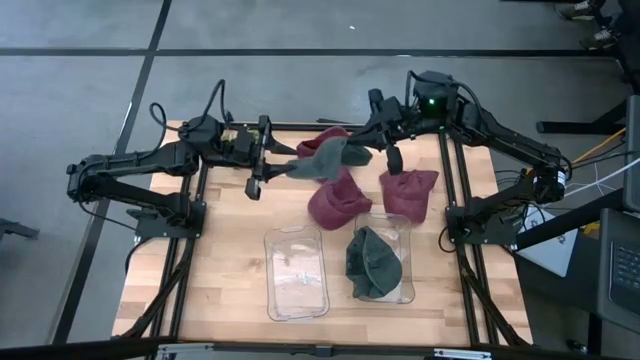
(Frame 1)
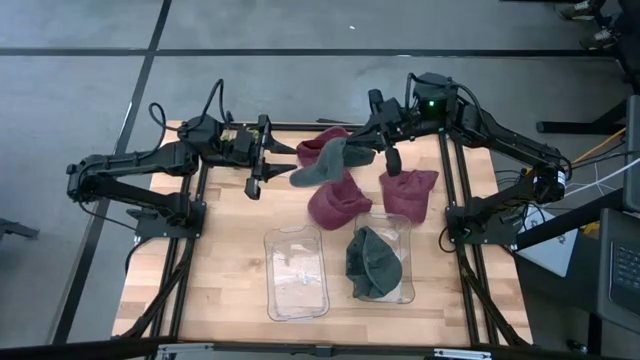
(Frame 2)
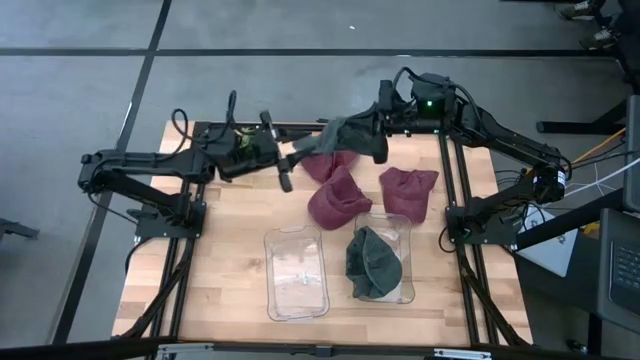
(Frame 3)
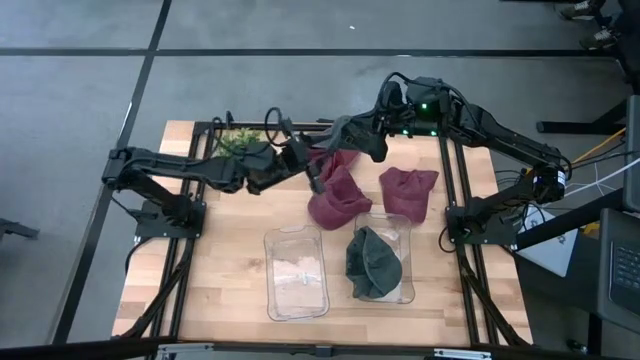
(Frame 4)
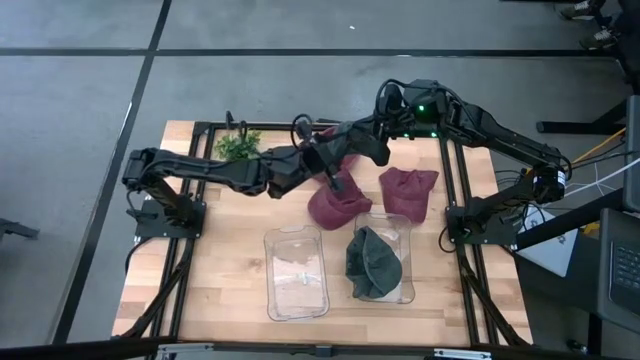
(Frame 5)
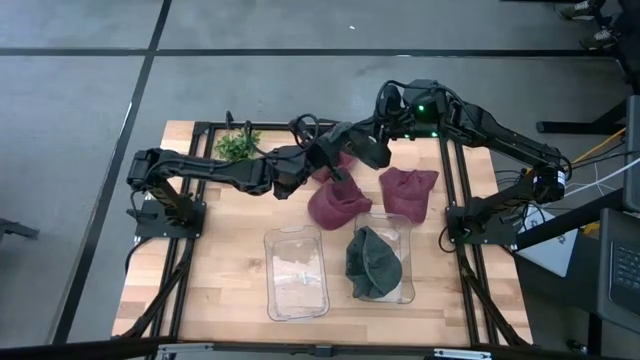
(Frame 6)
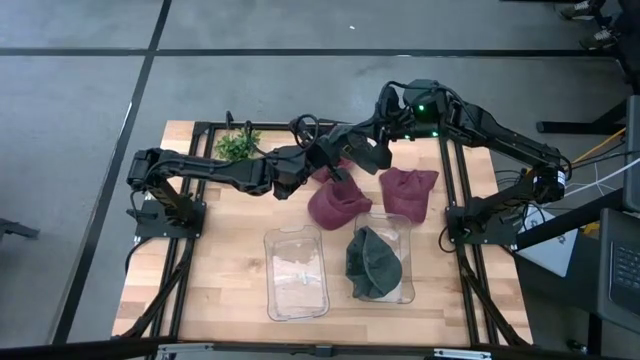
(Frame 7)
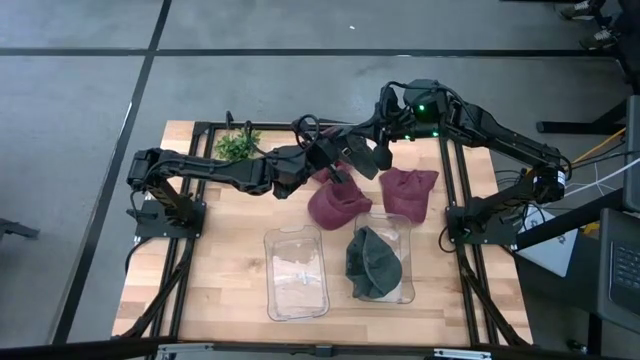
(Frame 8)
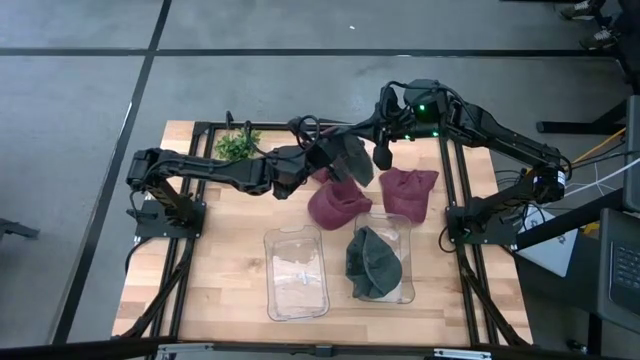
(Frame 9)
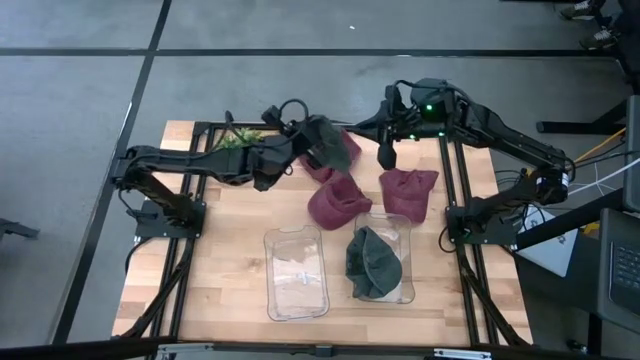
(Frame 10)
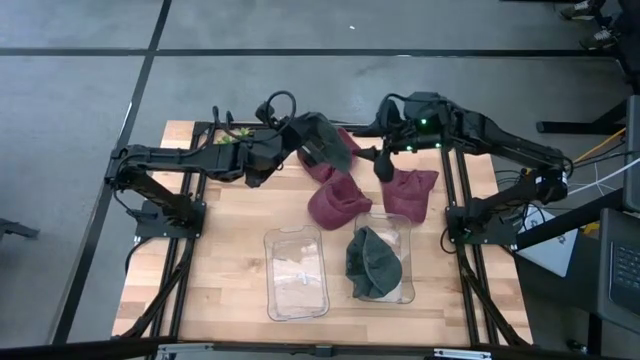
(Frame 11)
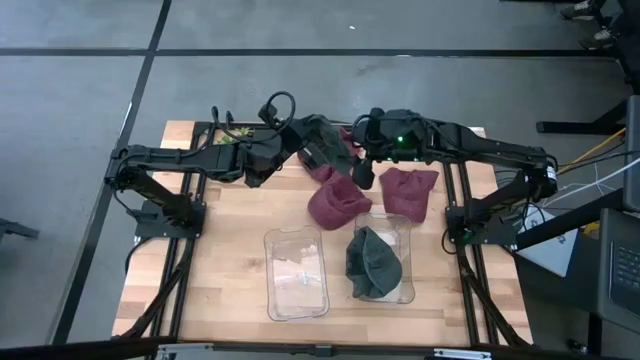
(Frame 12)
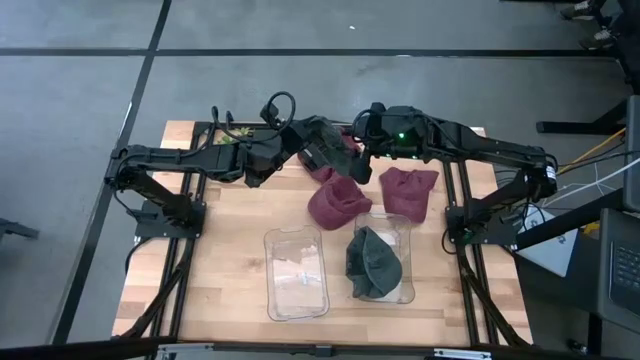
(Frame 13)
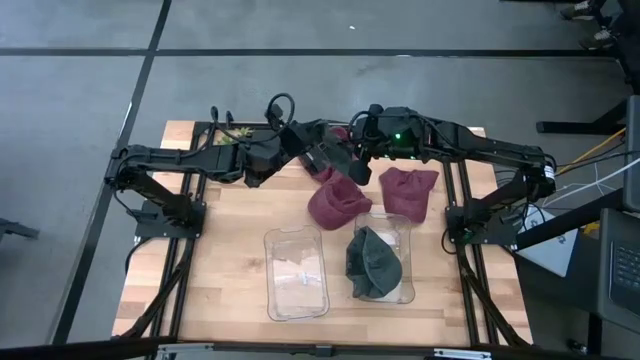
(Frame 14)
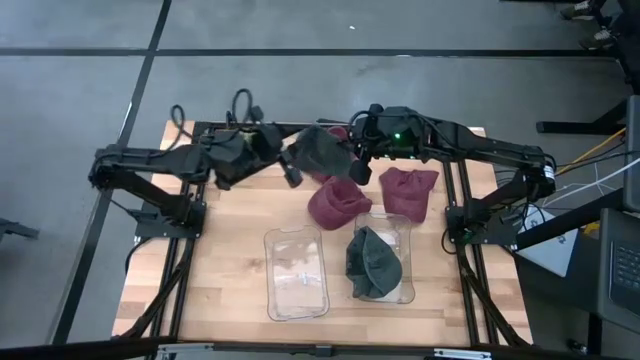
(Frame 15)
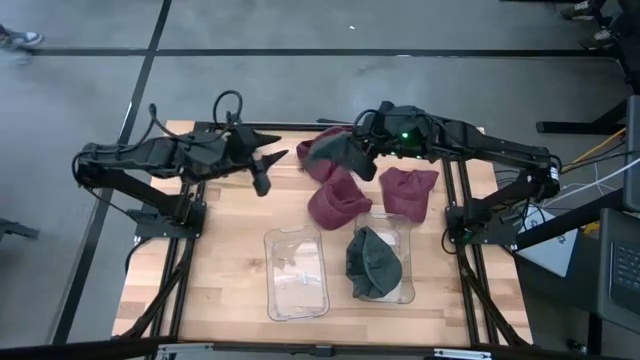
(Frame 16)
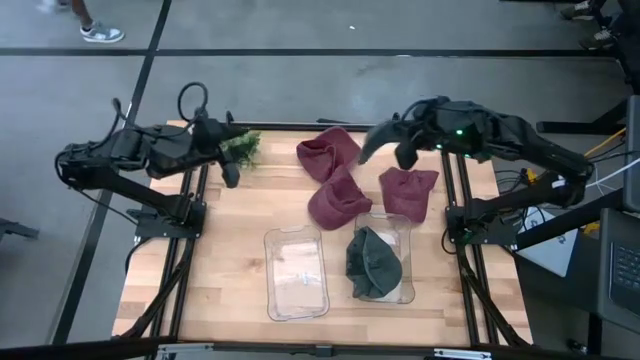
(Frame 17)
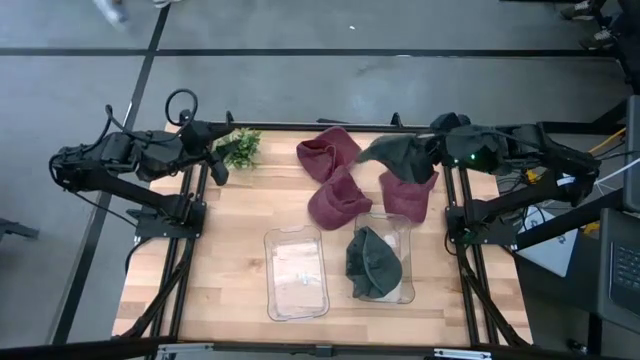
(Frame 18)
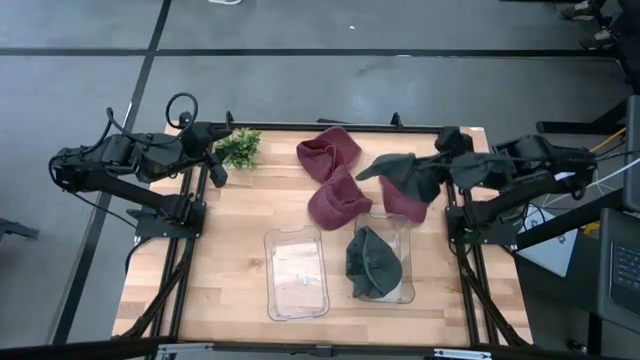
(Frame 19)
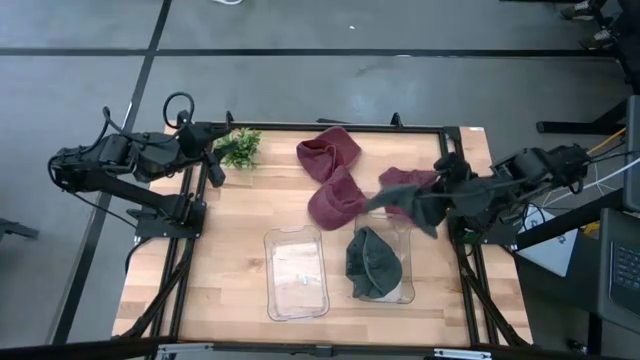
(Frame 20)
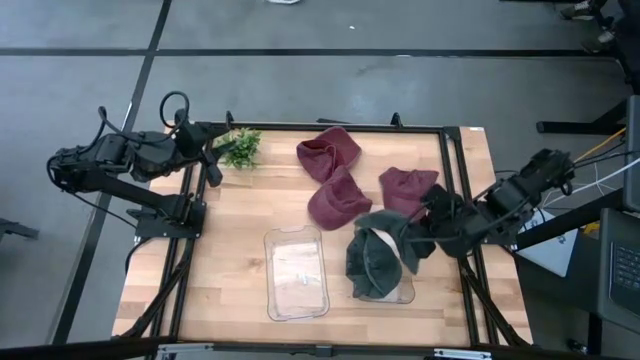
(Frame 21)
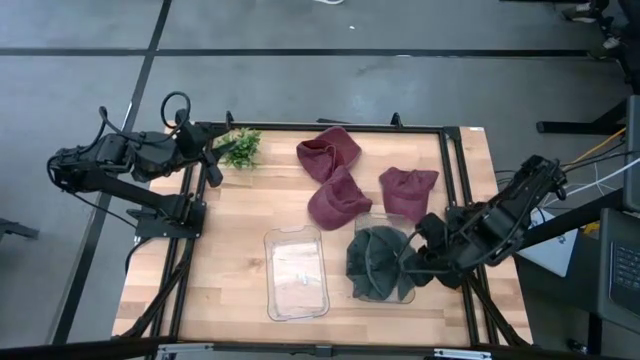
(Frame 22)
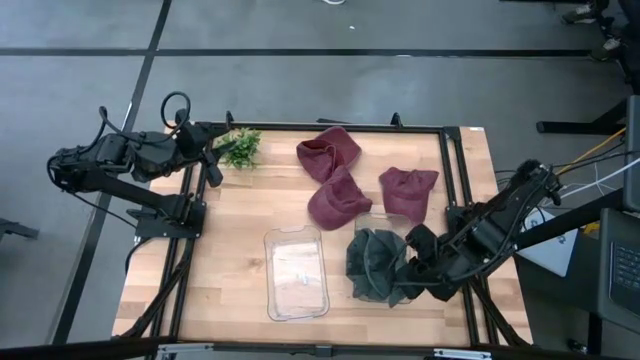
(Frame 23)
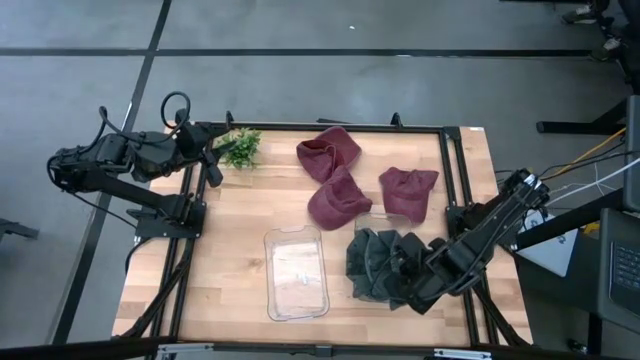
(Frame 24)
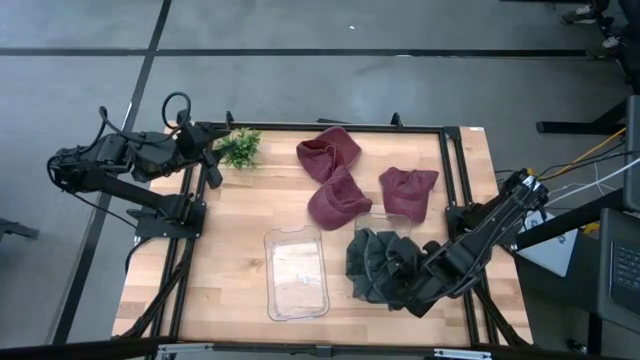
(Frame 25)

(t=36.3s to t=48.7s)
Task: Pick & Place hat
Put the black cap into the right transparent bin
